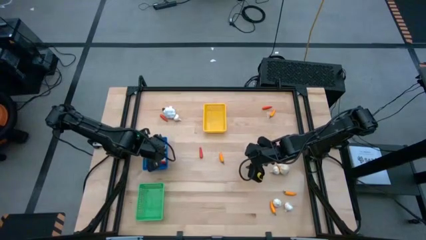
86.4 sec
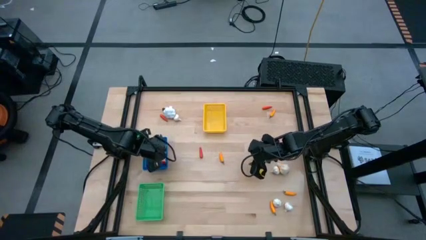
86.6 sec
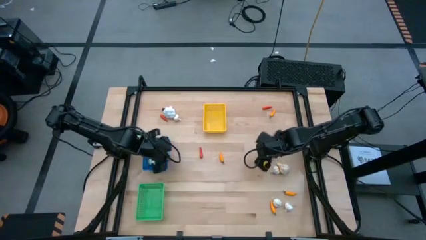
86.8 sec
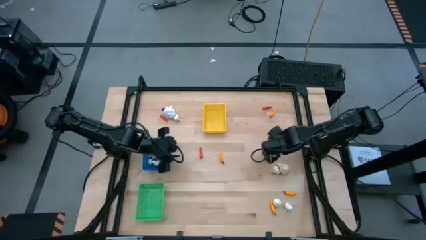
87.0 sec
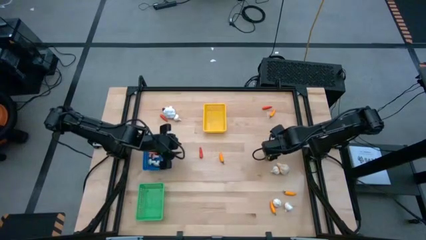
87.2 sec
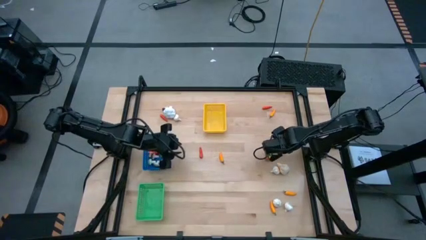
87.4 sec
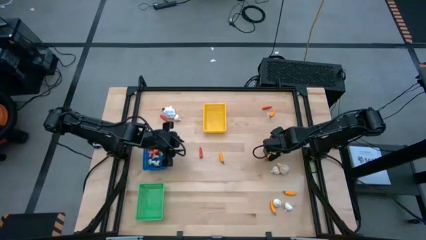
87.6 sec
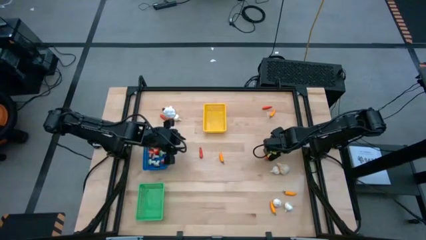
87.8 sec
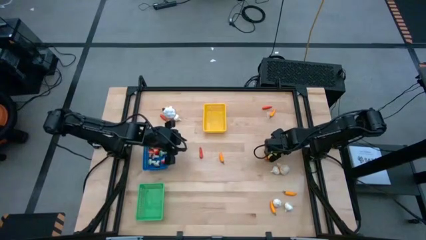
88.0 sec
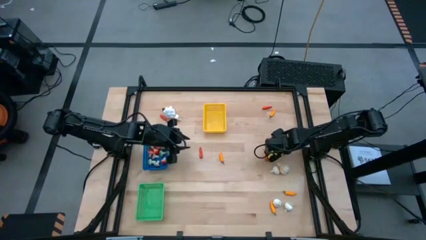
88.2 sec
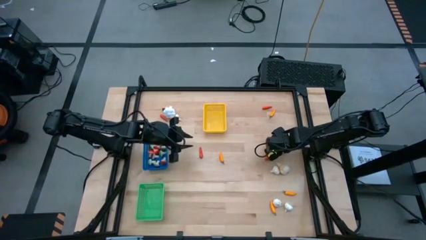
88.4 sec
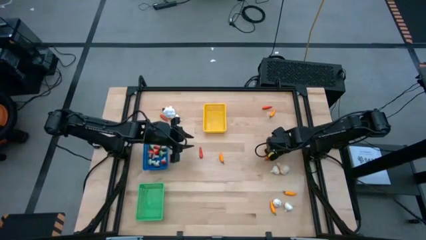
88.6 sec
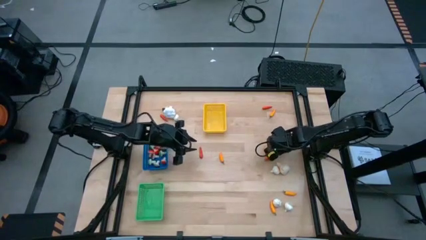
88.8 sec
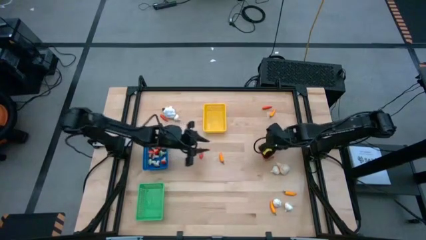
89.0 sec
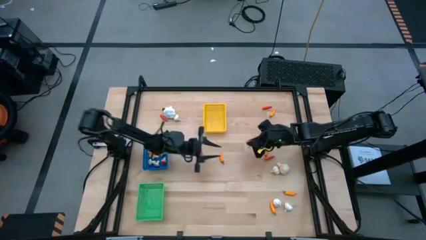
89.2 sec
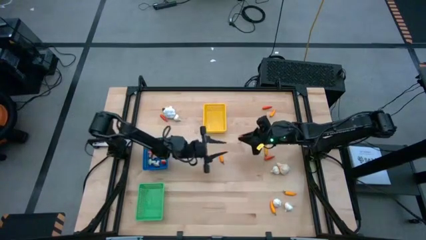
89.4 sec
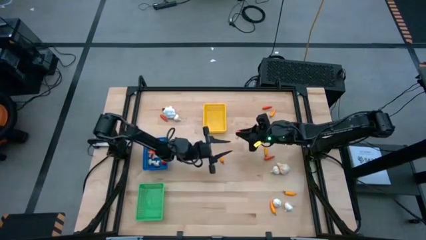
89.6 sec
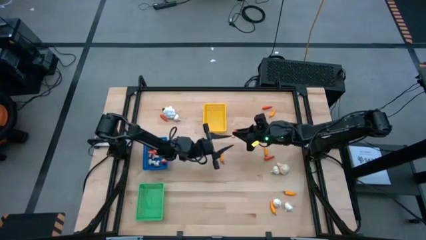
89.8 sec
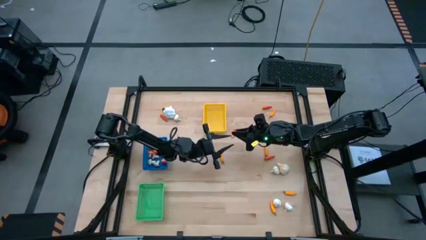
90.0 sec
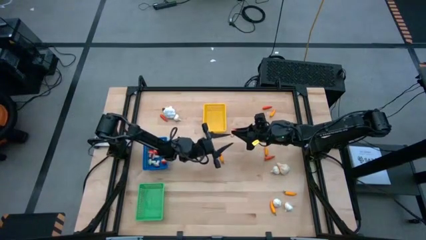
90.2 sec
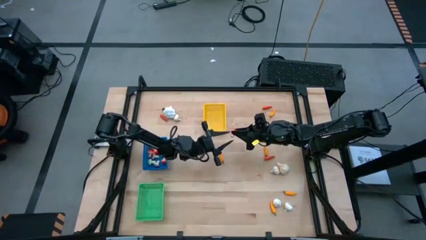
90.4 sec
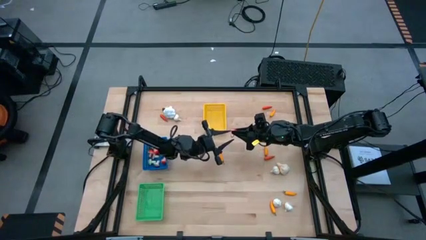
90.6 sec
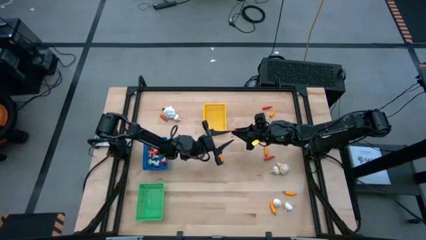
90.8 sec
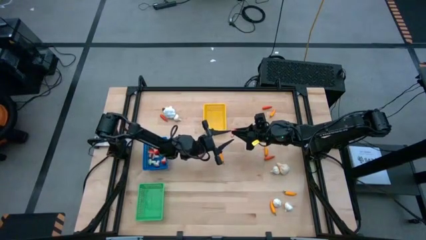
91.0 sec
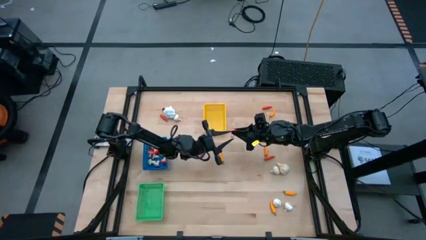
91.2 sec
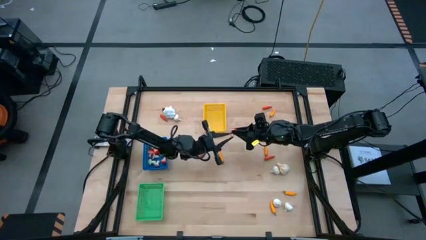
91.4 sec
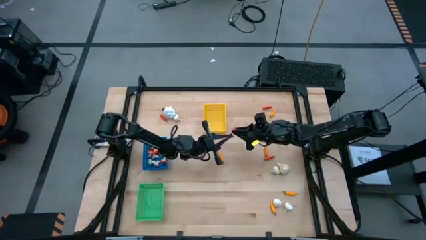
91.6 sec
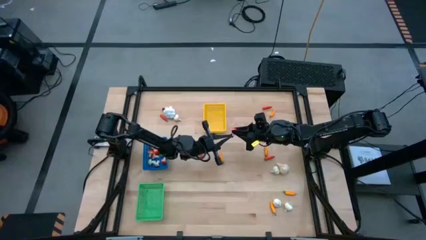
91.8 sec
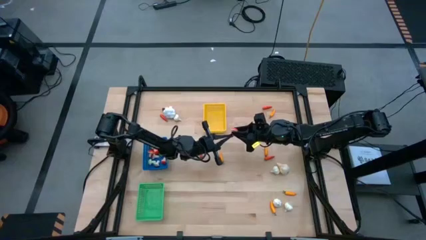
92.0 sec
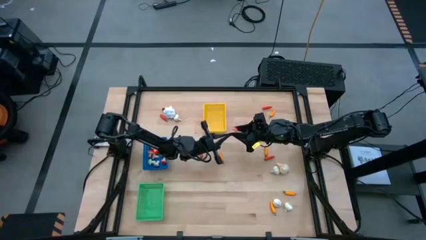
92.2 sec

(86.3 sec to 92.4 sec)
Task: Sort produce into baskets
Put the orange mushroom into the blue bin

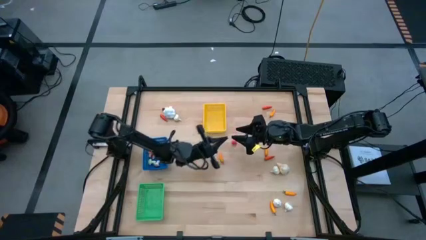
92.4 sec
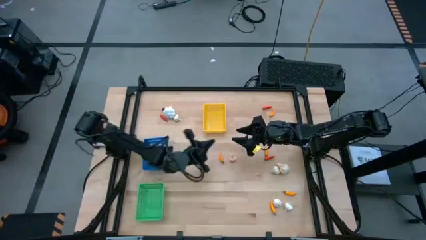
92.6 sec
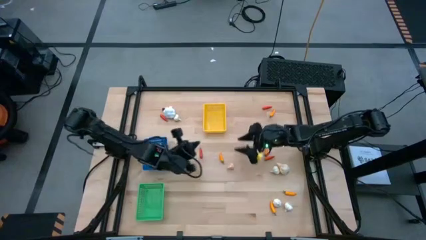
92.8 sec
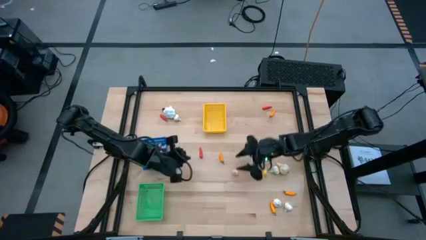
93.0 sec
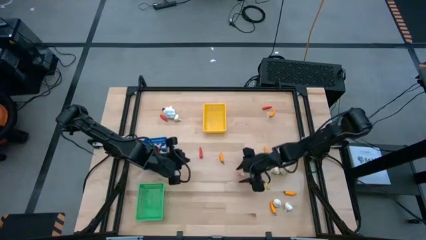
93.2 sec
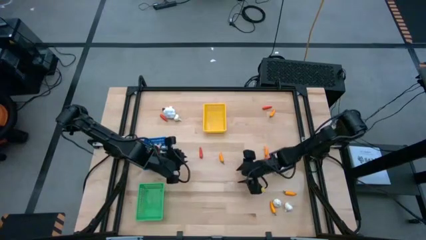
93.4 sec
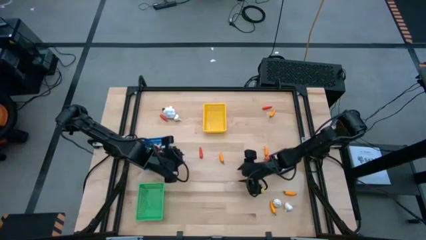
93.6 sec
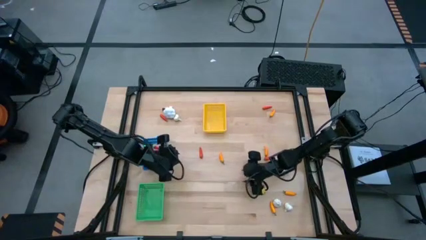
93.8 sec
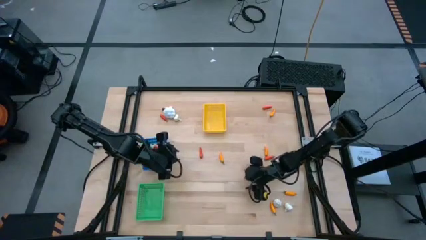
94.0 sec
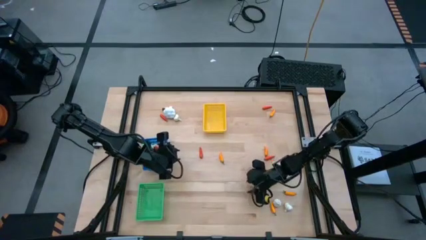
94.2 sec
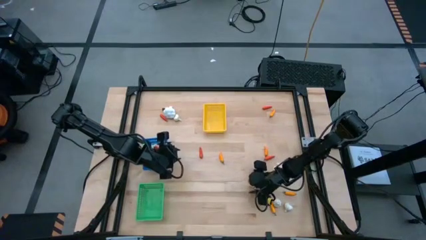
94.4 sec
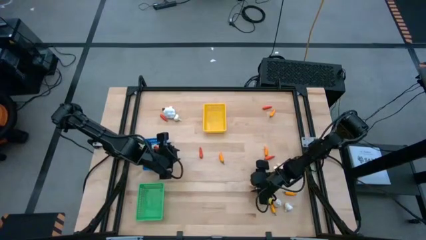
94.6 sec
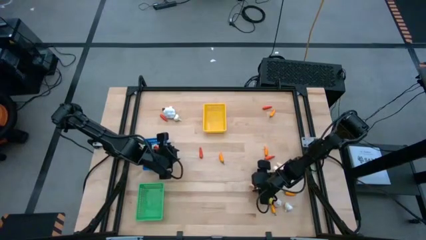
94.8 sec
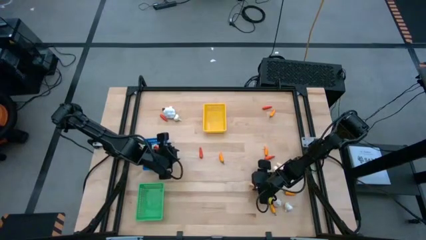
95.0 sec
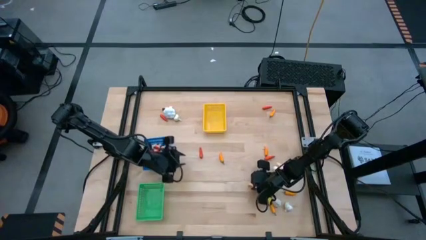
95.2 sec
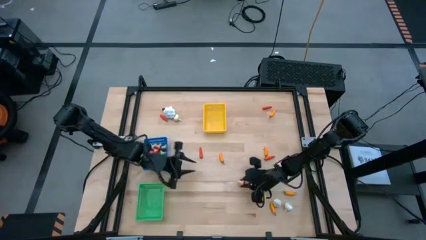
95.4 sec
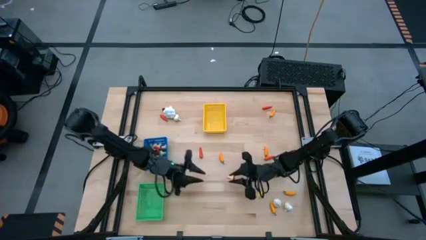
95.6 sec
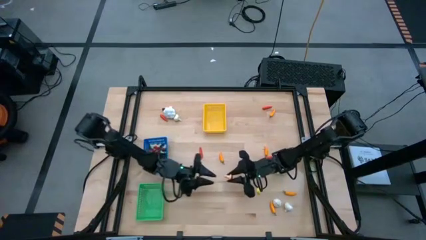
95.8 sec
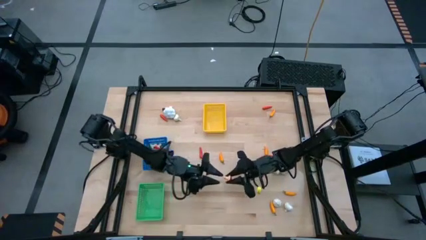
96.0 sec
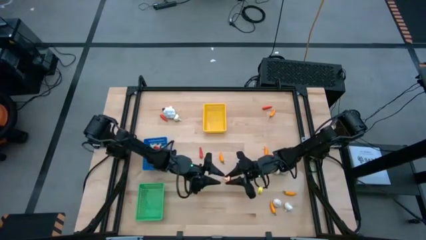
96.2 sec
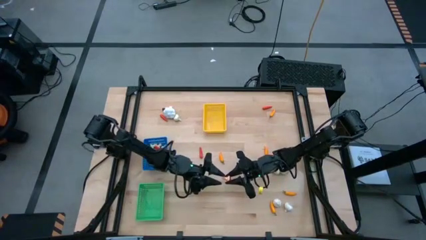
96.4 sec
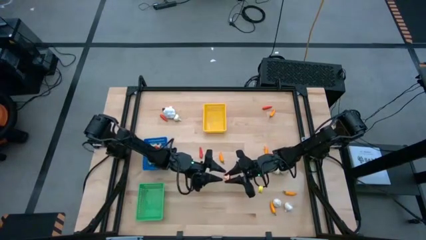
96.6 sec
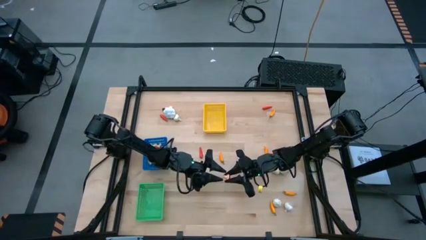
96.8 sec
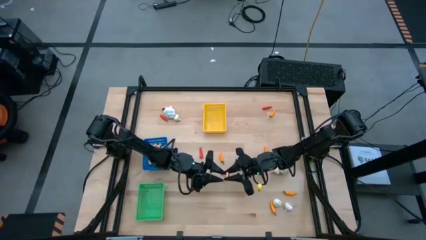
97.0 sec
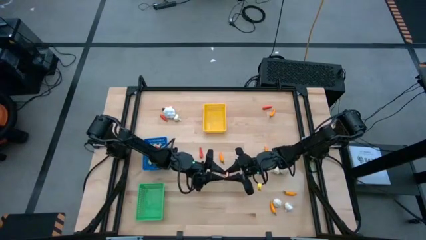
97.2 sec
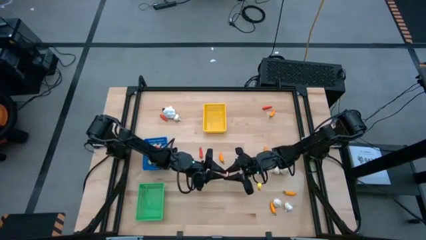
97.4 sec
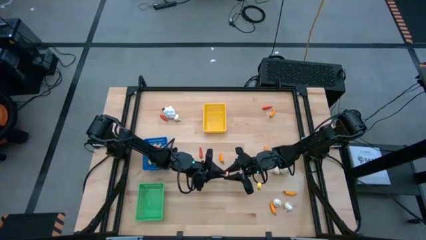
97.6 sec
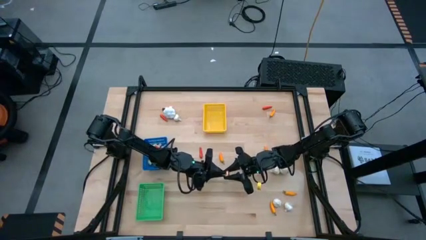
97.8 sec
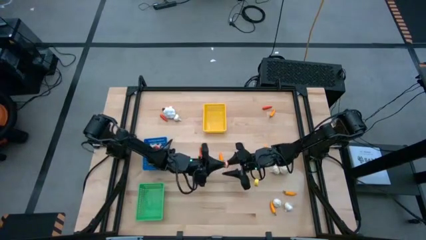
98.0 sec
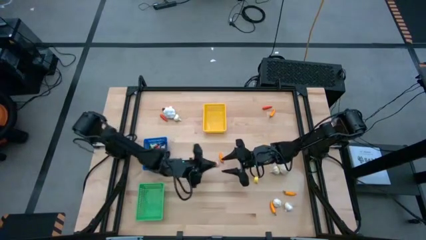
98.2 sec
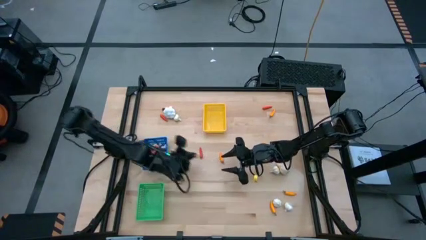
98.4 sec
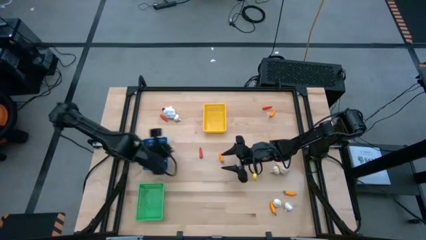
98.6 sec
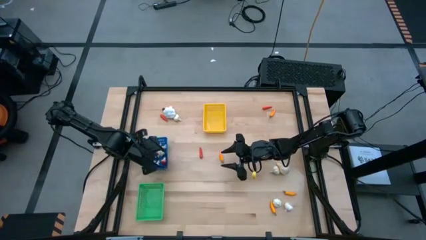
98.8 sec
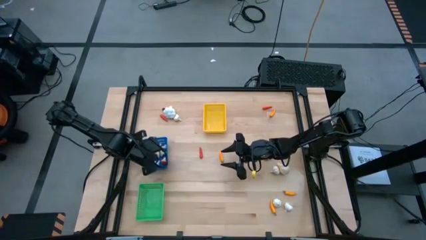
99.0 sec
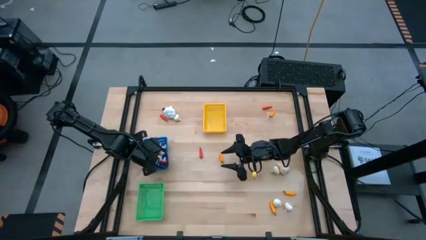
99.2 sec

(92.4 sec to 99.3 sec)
Put the orange mushroom into the blue bin

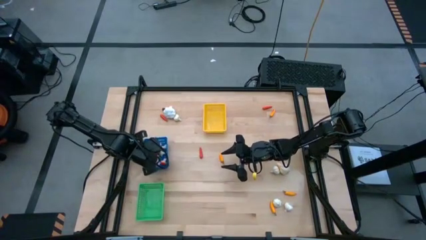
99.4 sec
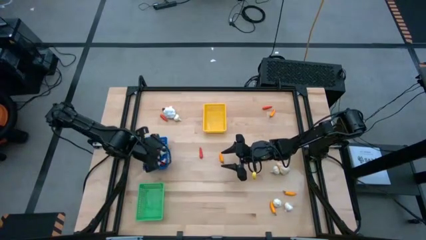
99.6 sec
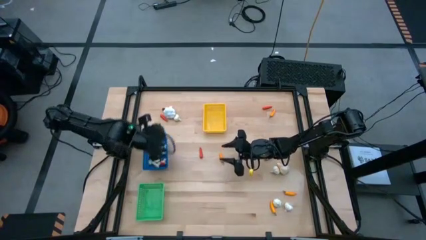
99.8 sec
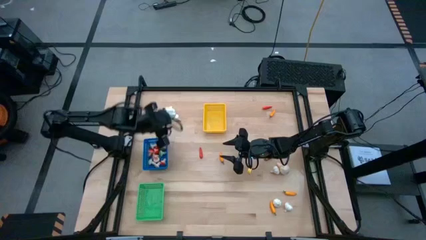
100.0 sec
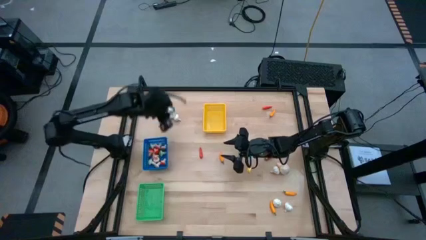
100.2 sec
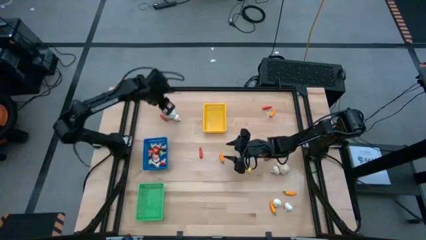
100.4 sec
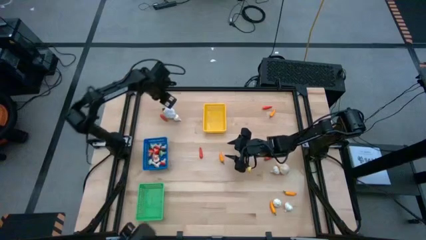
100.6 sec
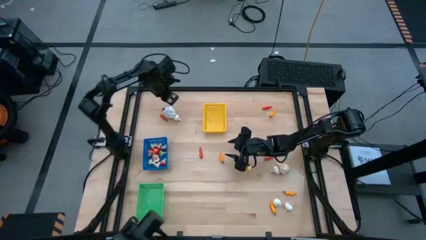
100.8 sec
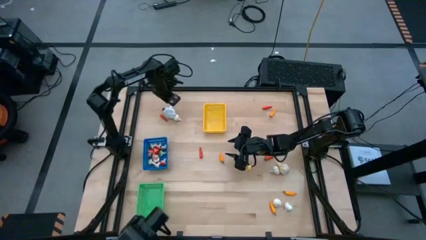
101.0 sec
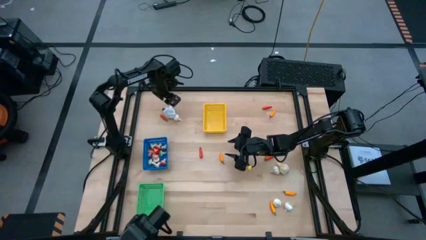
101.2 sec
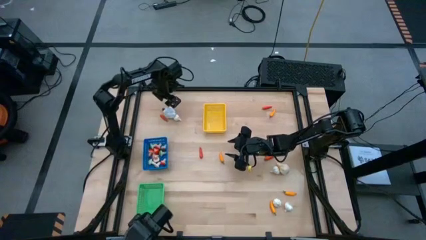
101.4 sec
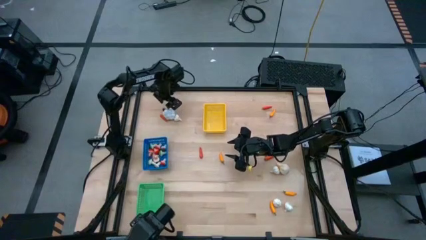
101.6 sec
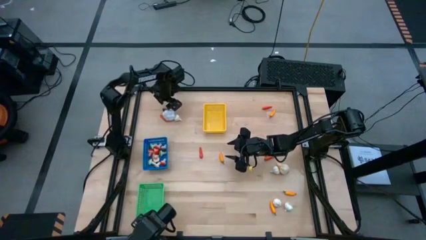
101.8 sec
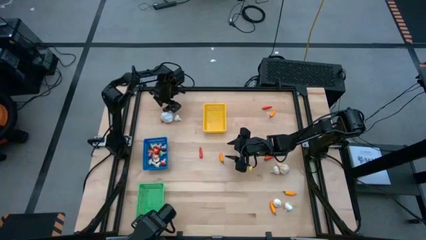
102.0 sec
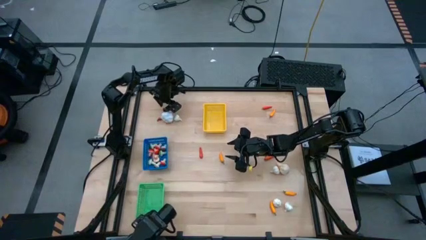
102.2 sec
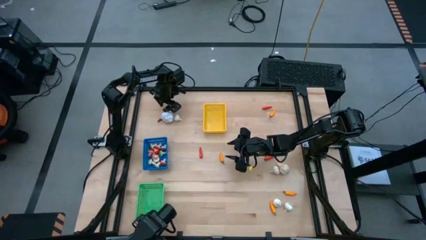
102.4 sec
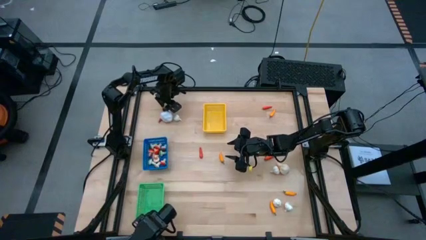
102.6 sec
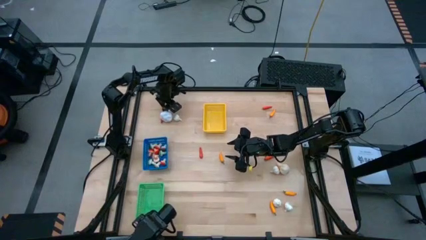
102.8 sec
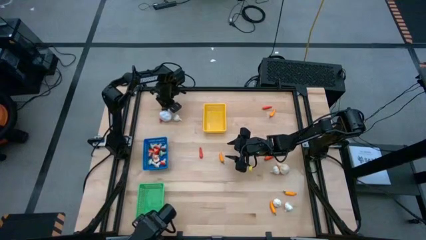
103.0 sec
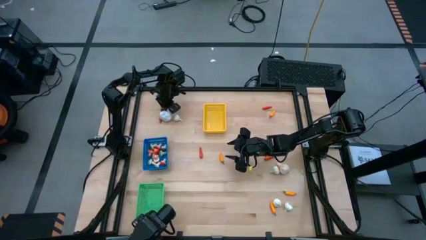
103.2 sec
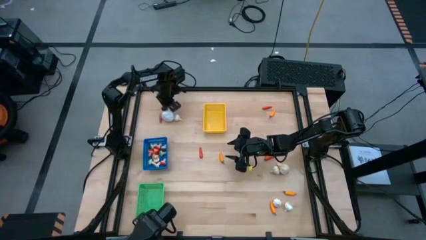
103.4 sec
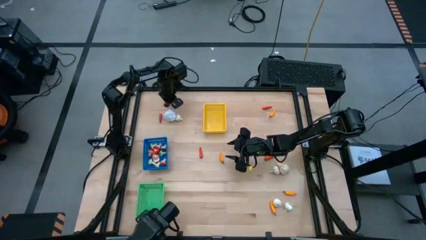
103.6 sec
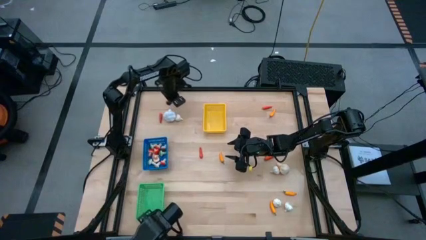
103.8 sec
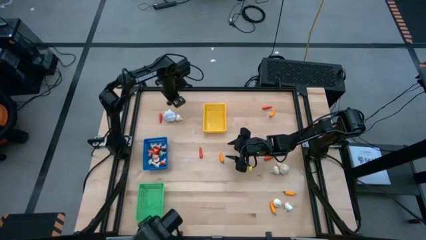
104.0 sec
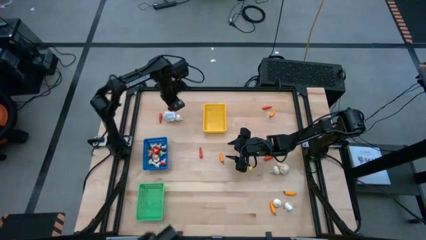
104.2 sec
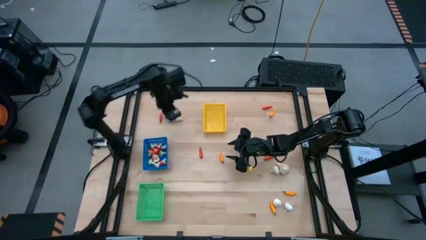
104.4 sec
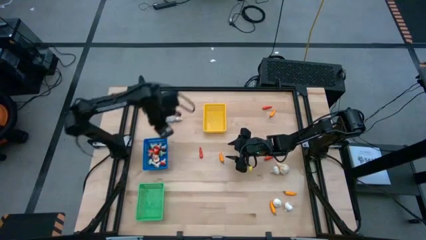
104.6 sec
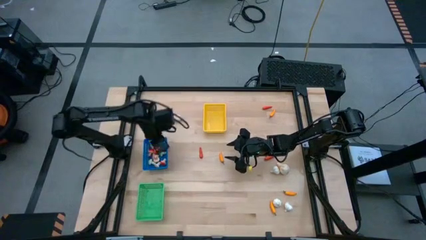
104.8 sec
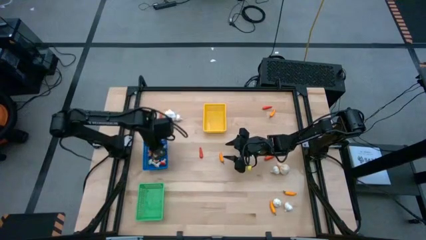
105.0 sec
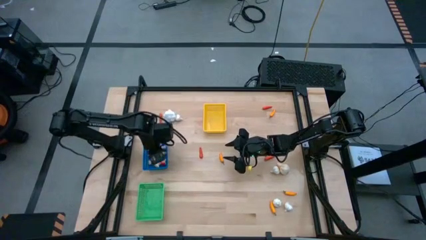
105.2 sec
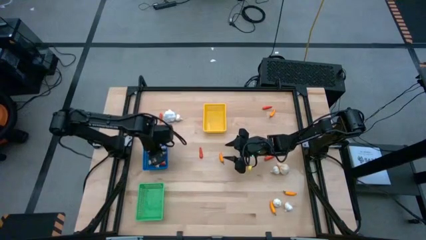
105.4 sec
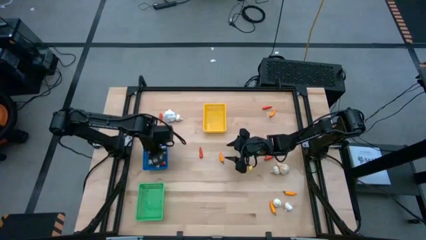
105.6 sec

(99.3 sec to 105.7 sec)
Put the brown mushroom into the blue bin
